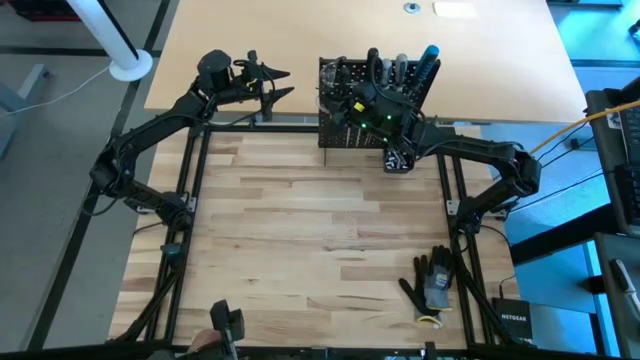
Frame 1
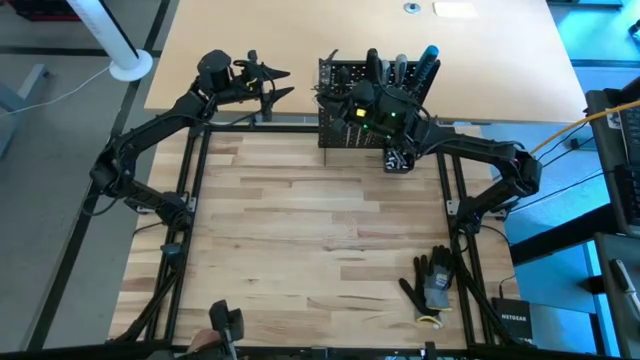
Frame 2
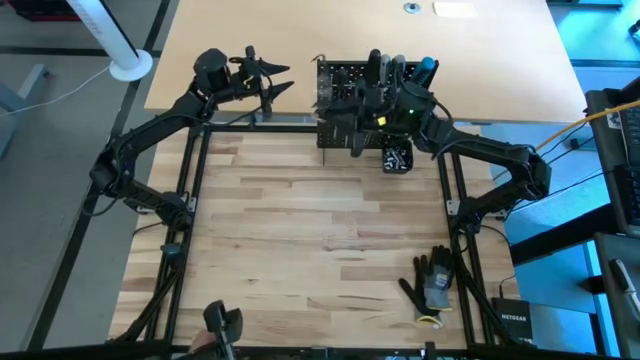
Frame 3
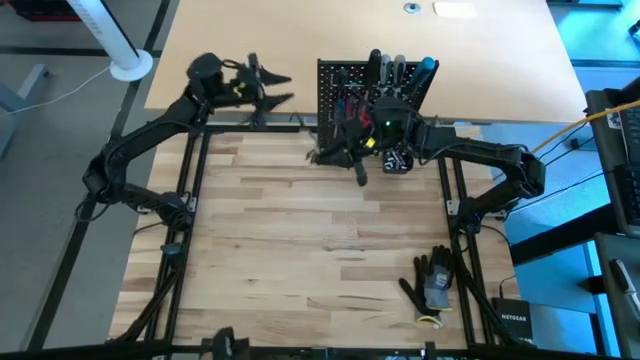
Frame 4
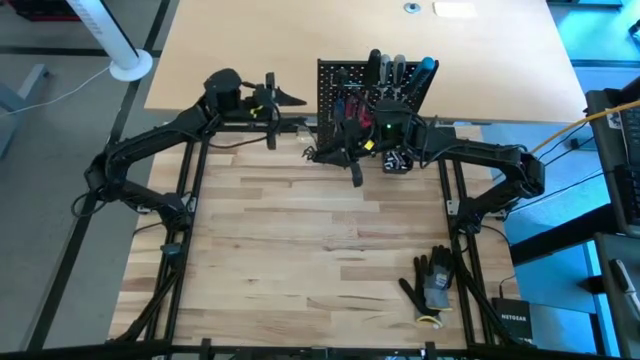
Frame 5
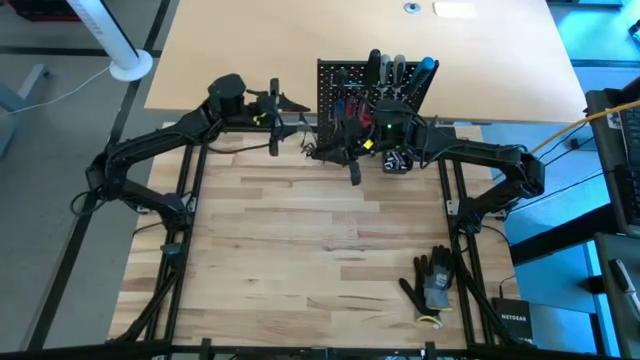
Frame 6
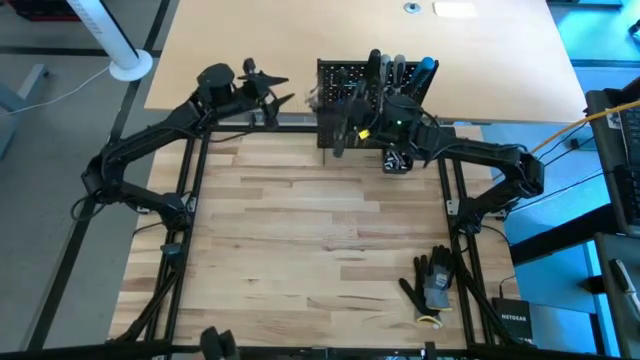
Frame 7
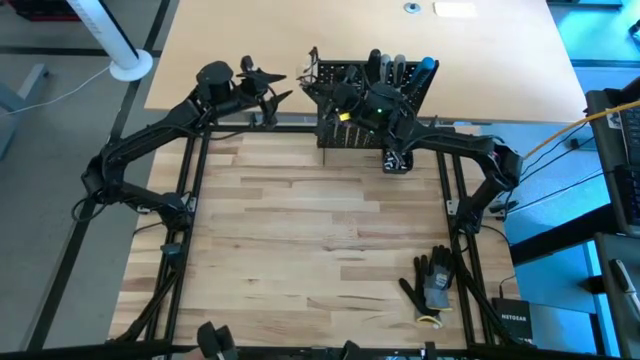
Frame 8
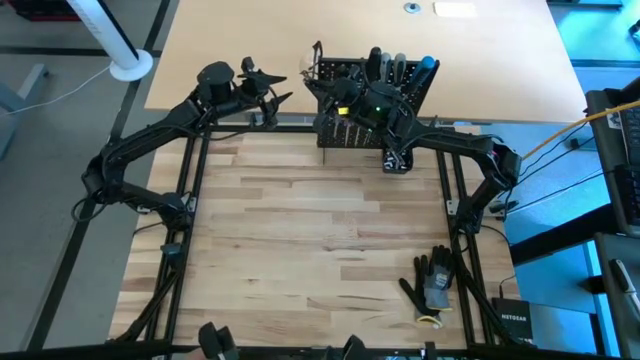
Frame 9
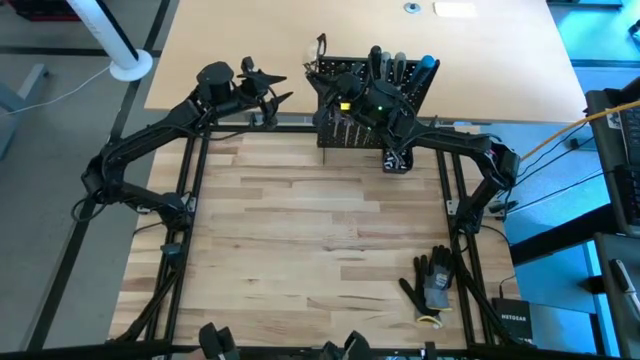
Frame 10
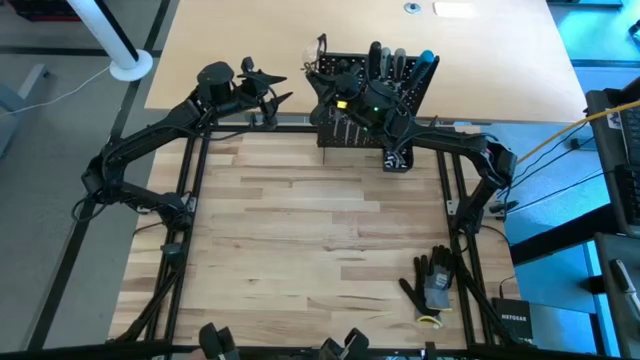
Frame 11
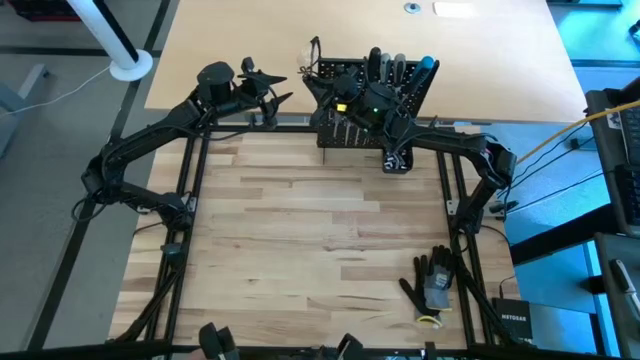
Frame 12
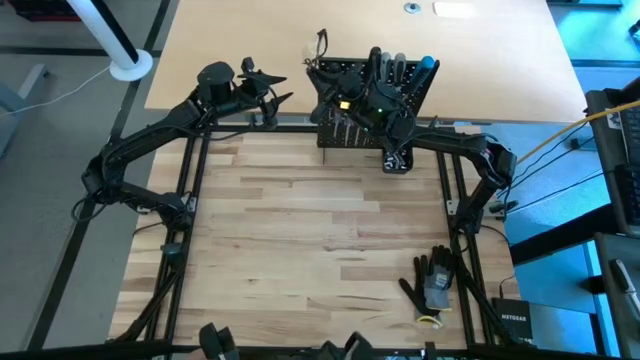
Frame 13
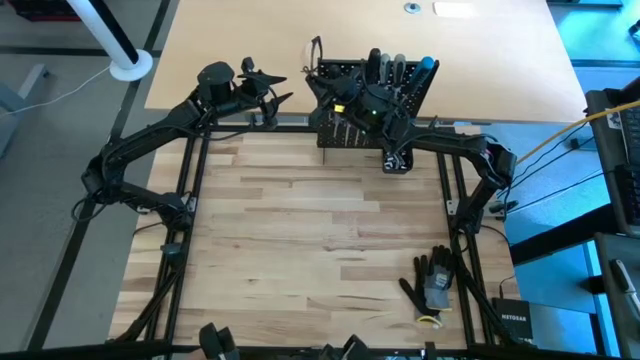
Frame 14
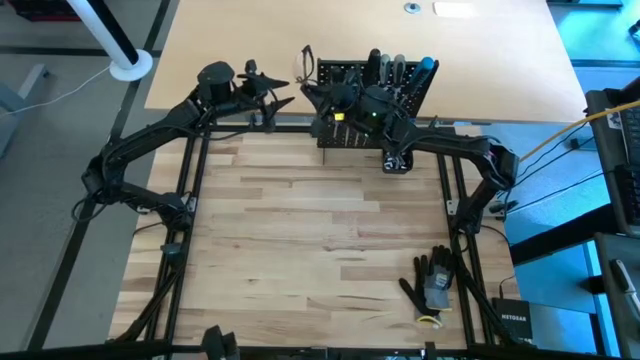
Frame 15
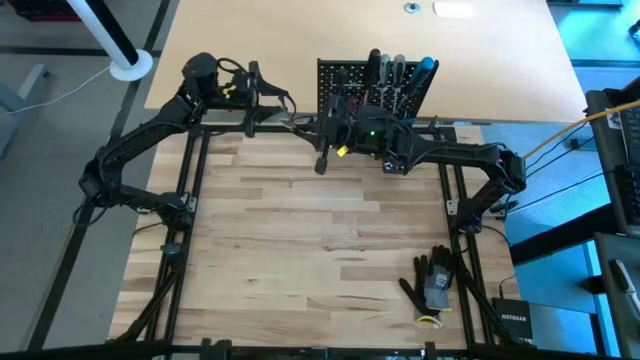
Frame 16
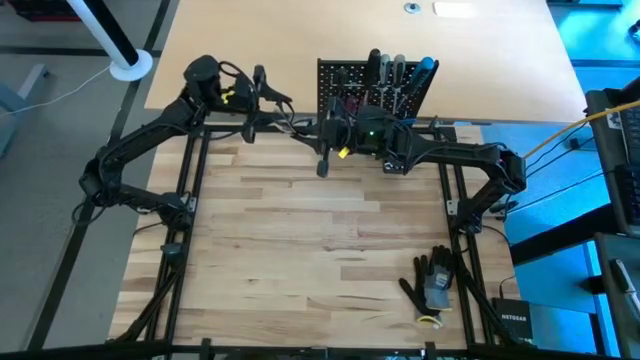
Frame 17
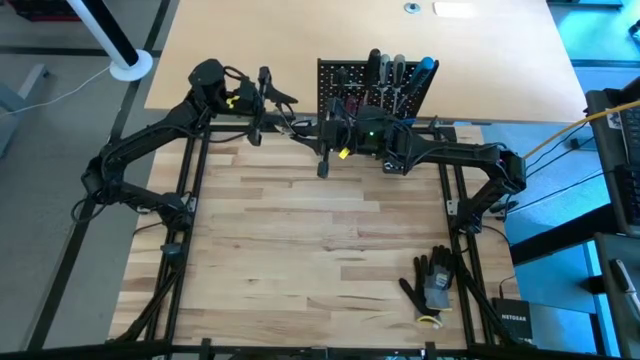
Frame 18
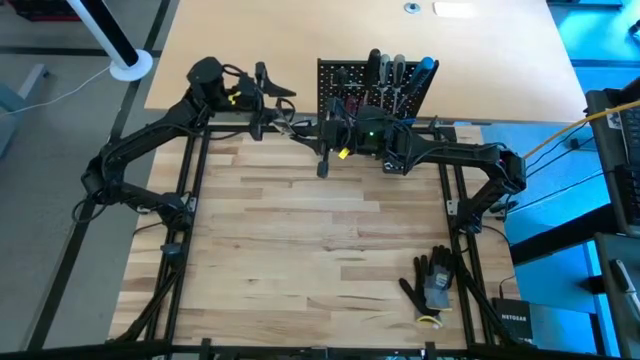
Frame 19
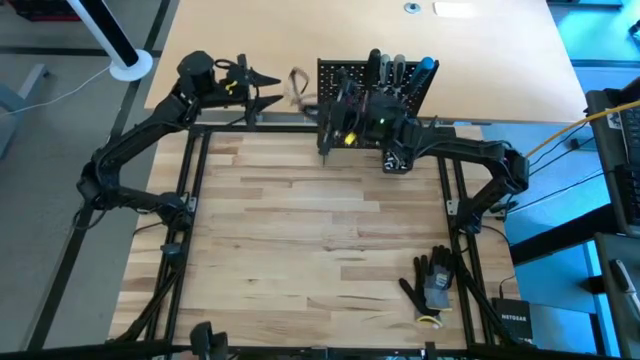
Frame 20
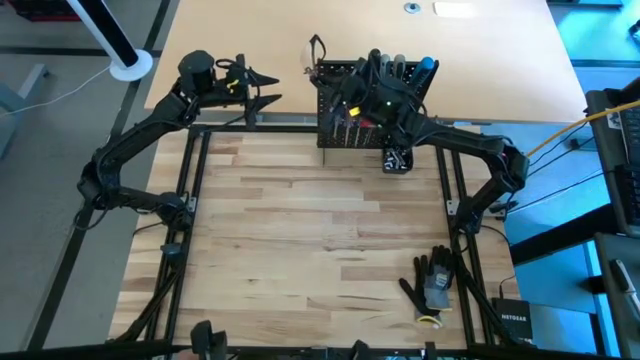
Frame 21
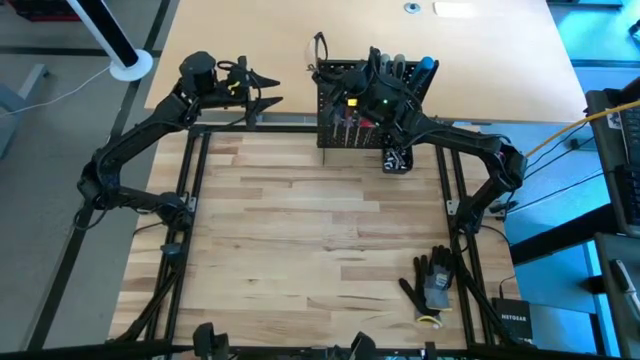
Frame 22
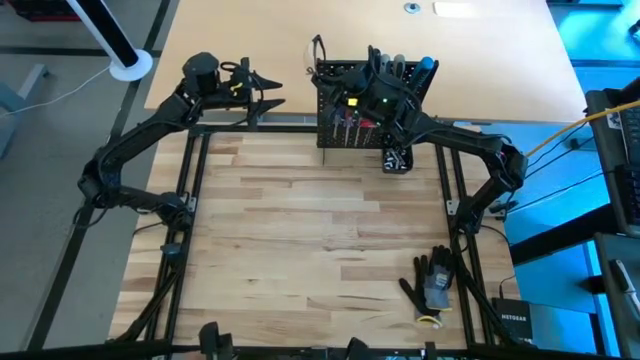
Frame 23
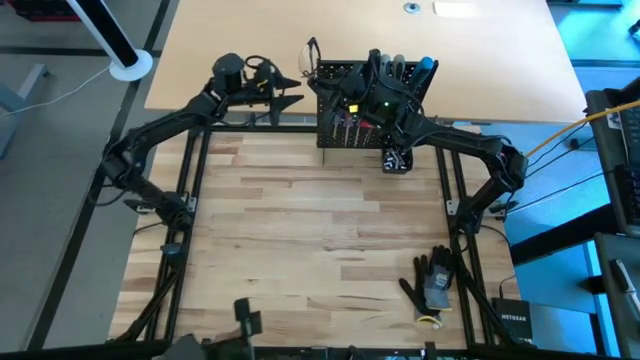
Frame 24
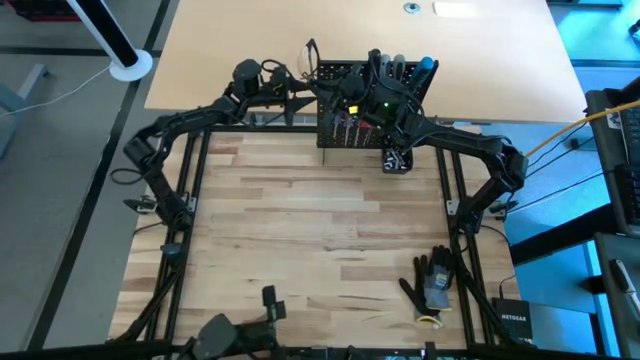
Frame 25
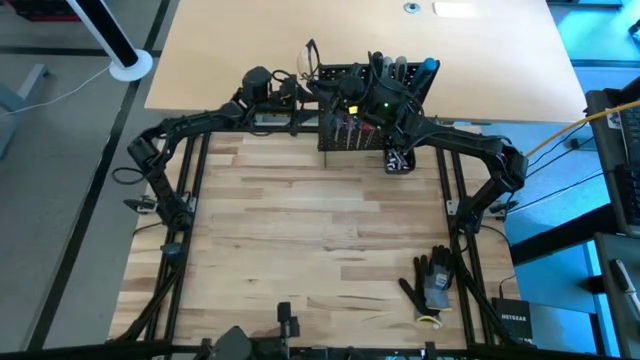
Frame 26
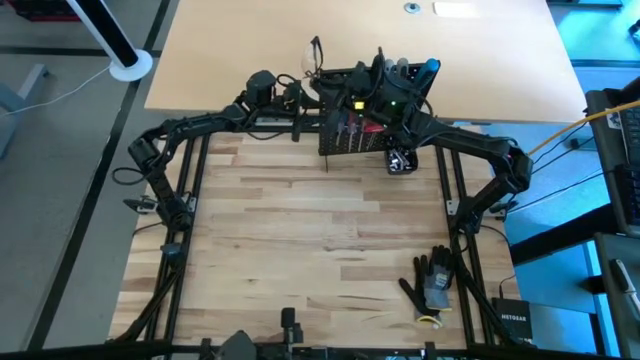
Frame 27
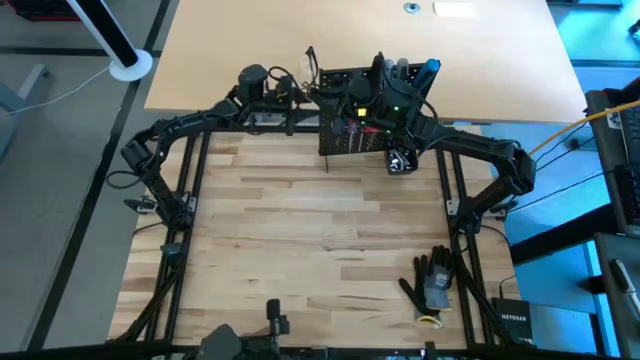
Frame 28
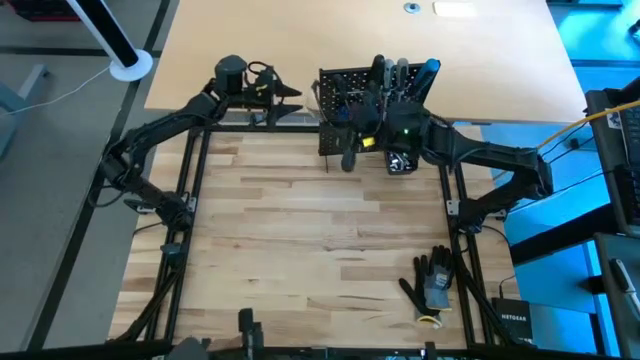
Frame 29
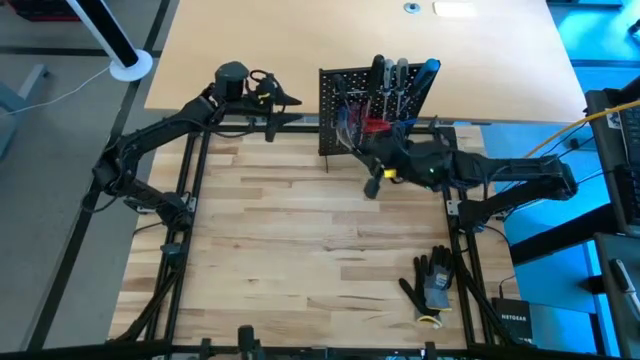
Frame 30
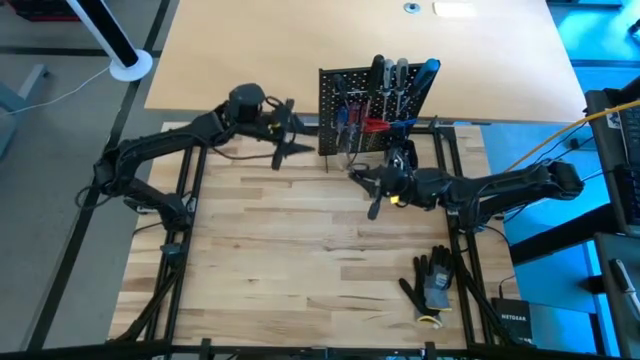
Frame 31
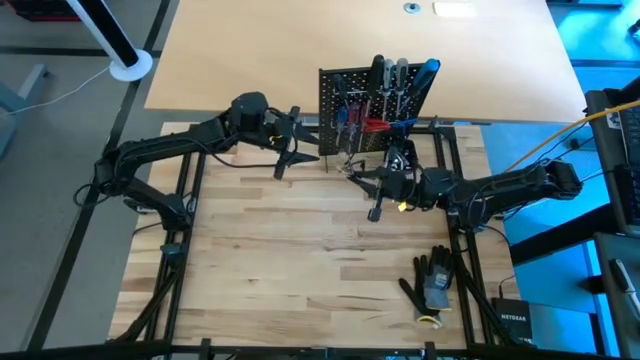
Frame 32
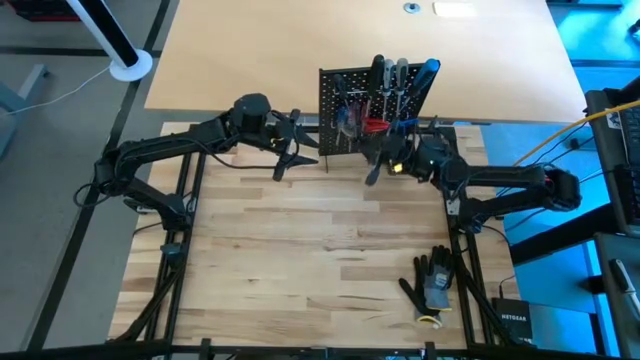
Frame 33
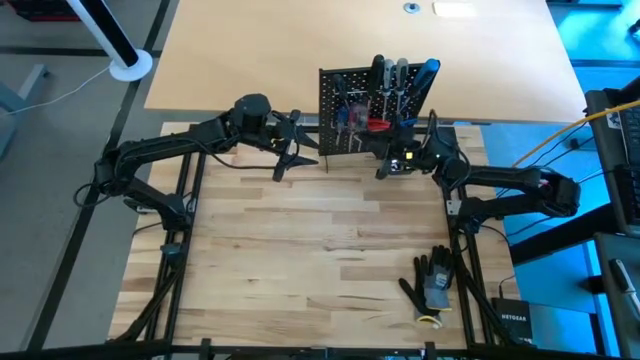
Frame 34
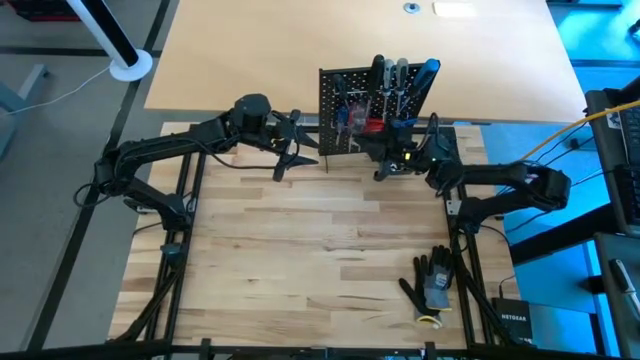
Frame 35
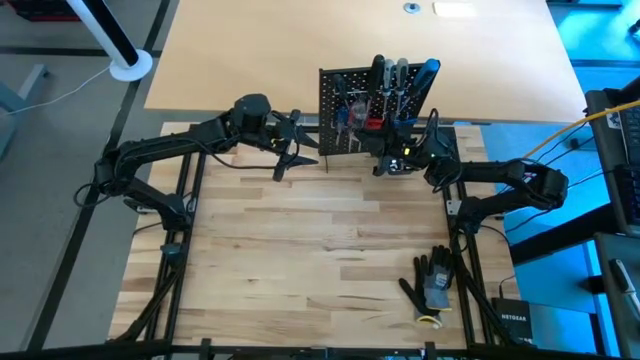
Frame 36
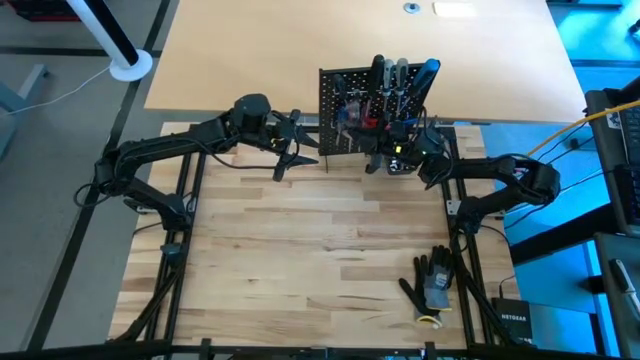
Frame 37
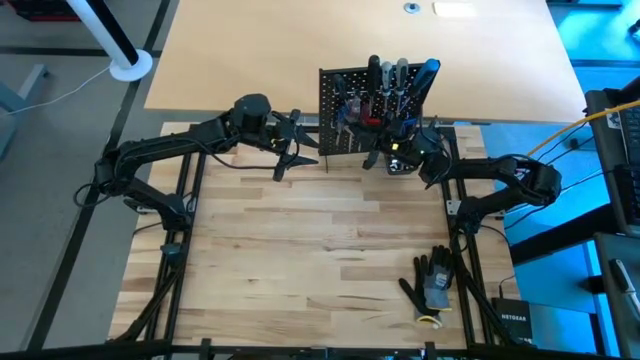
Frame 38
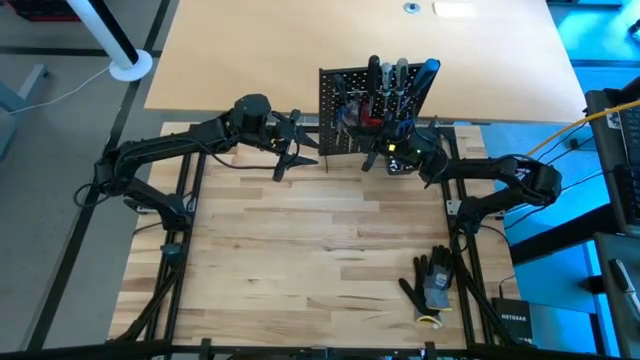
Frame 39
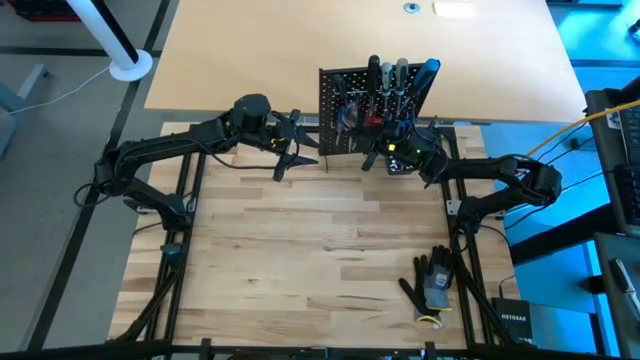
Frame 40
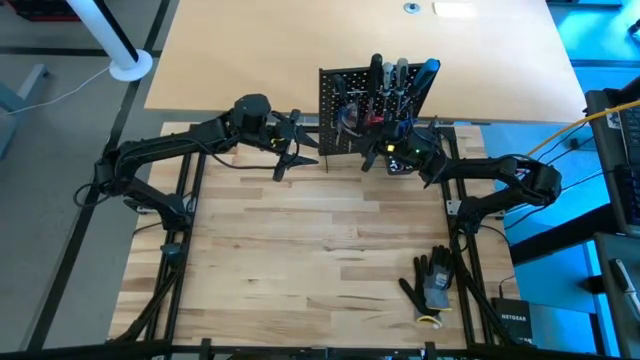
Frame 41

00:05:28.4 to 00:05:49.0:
Task: Hang tools onto peg board
Hang the black safety glasses on the peg board

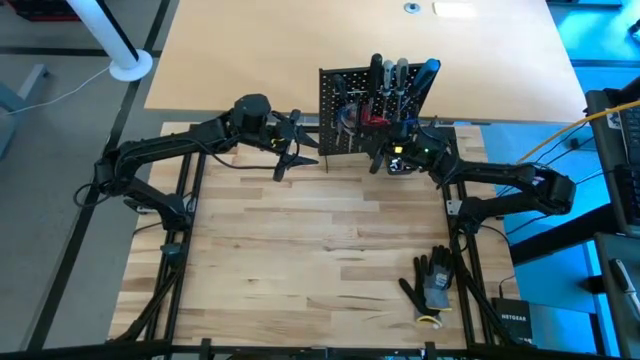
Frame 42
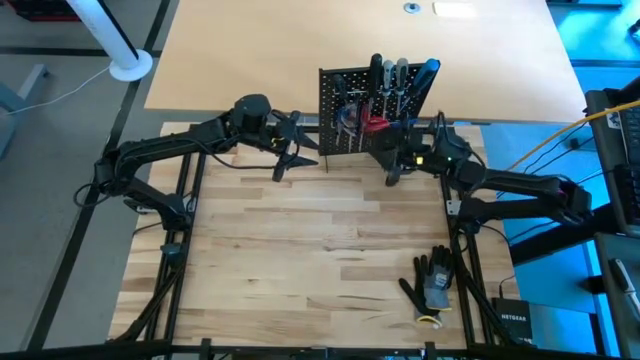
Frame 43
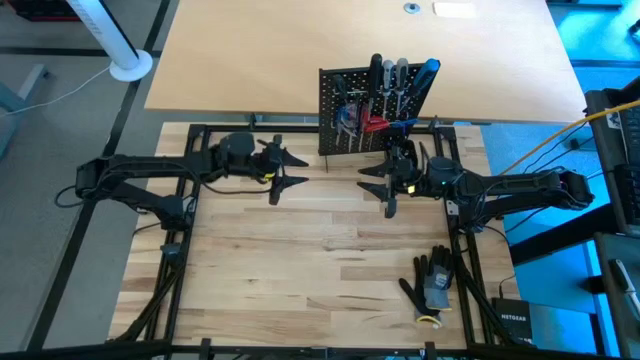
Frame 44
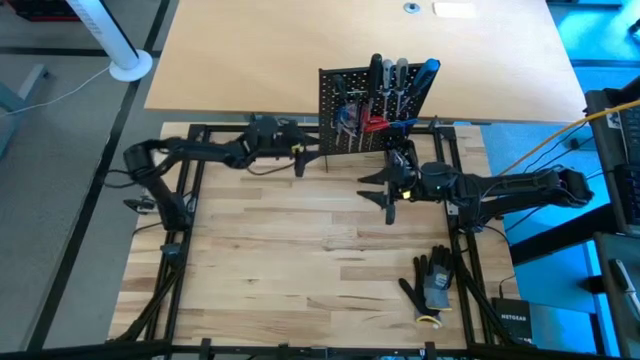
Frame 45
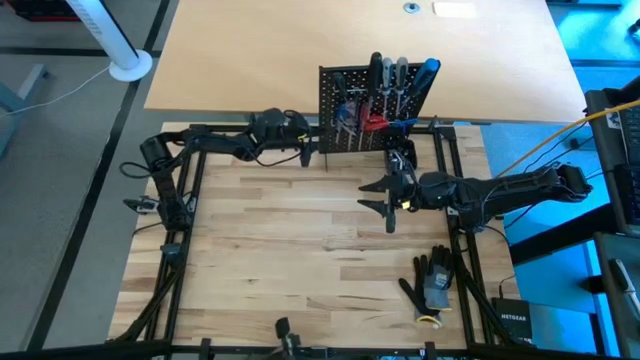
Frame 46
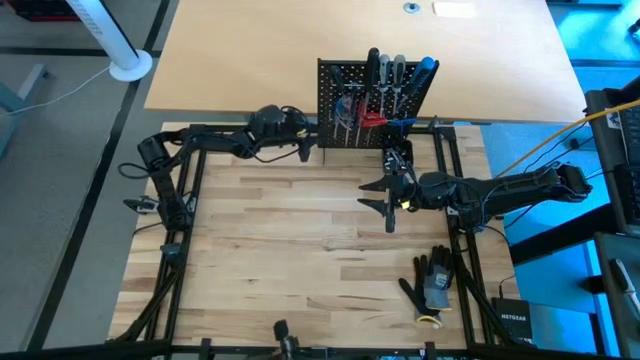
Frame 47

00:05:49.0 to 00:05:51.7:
Adjust the peg board
